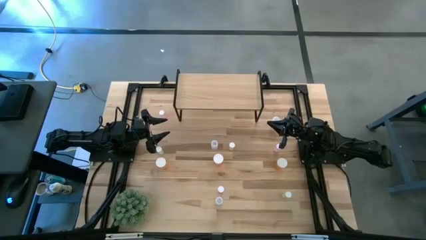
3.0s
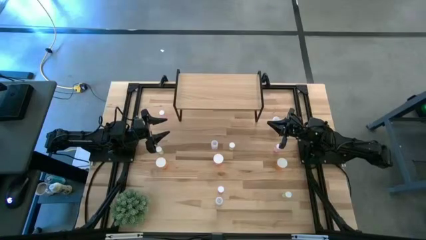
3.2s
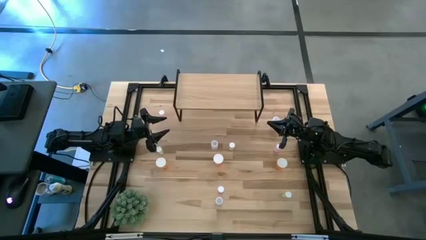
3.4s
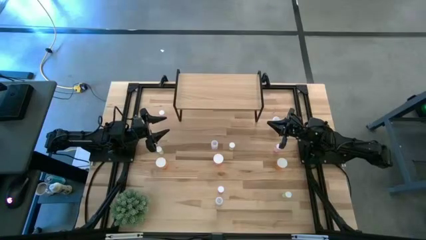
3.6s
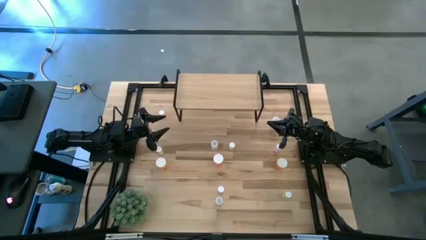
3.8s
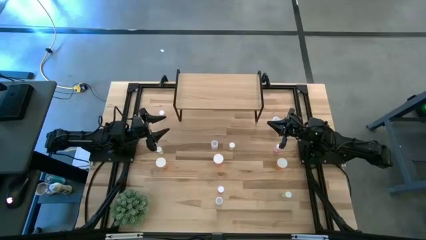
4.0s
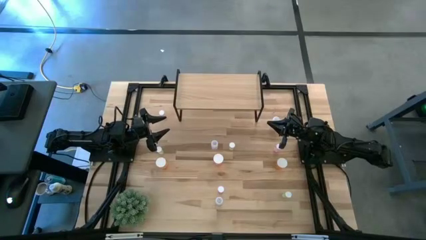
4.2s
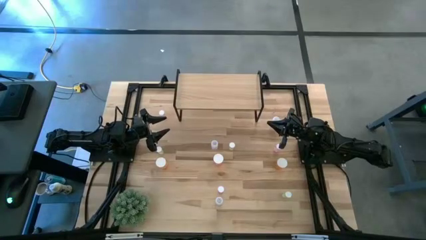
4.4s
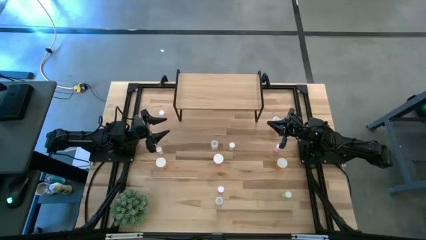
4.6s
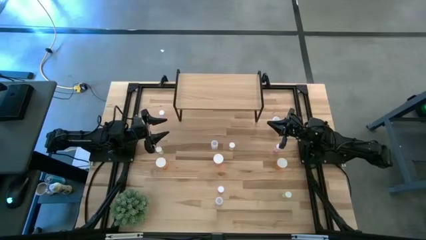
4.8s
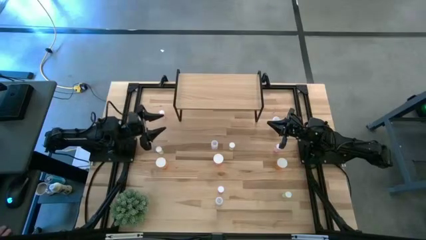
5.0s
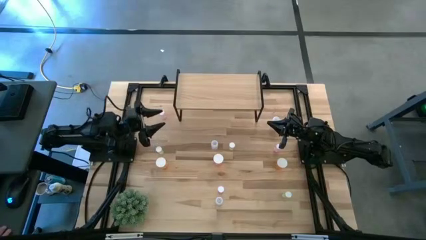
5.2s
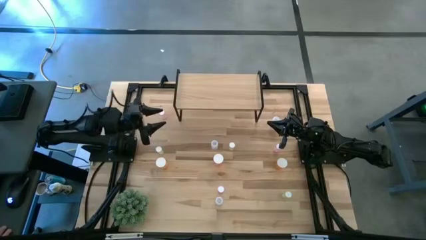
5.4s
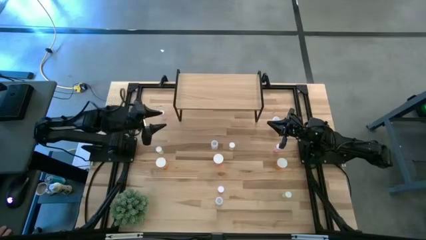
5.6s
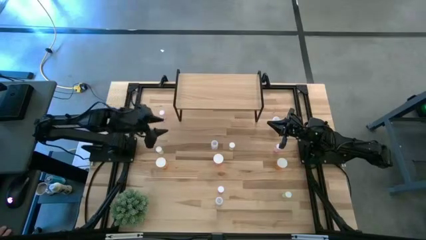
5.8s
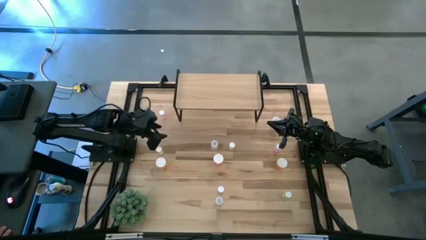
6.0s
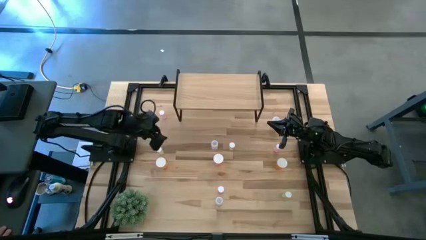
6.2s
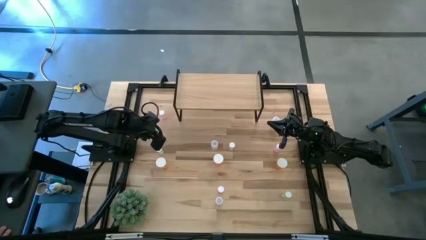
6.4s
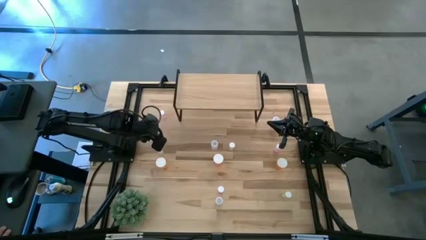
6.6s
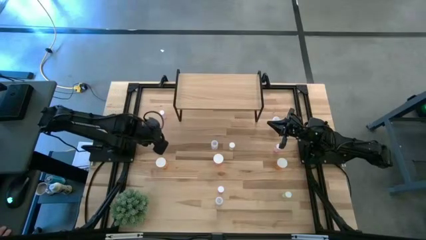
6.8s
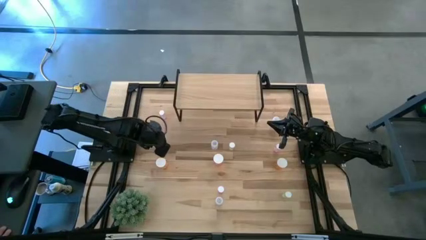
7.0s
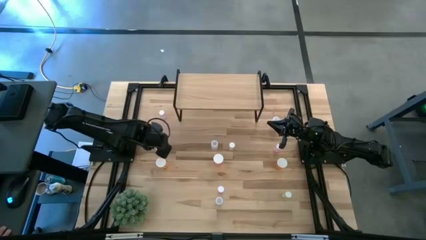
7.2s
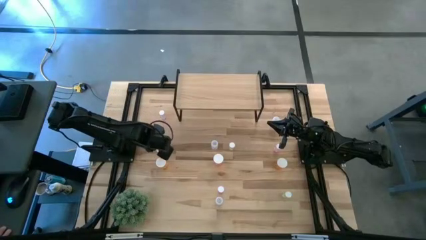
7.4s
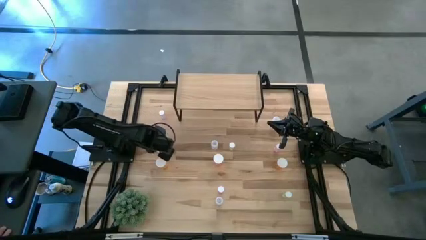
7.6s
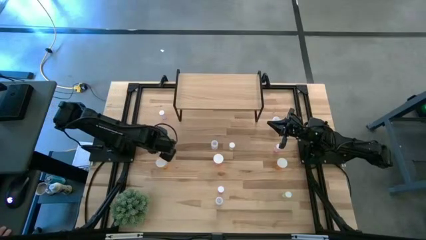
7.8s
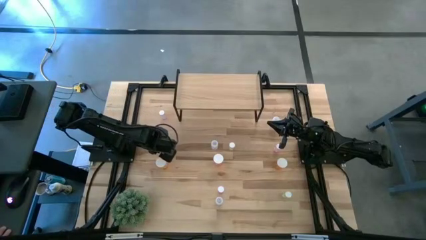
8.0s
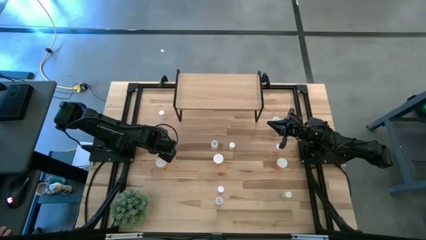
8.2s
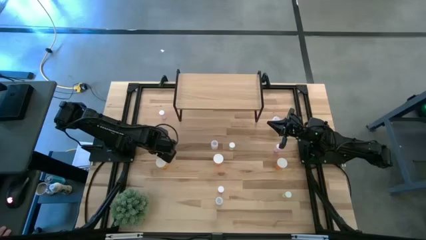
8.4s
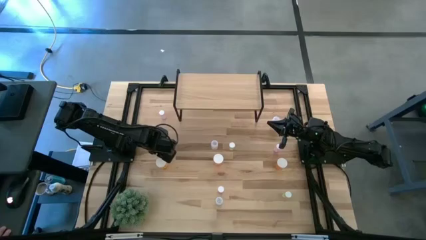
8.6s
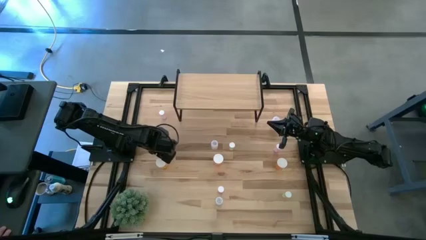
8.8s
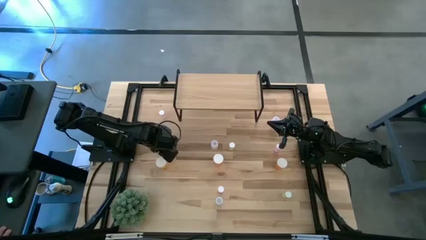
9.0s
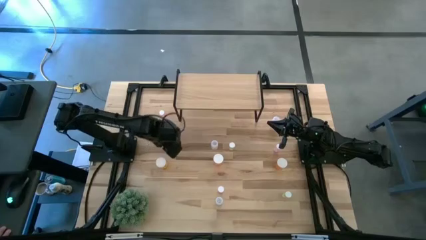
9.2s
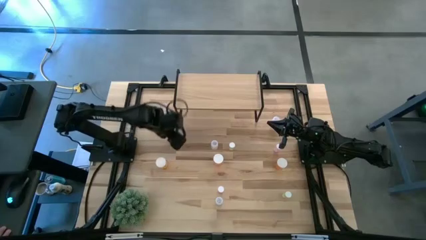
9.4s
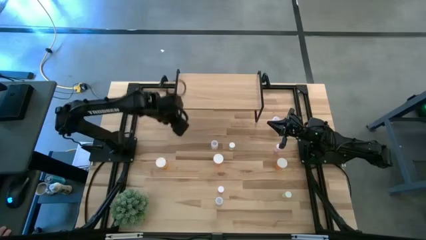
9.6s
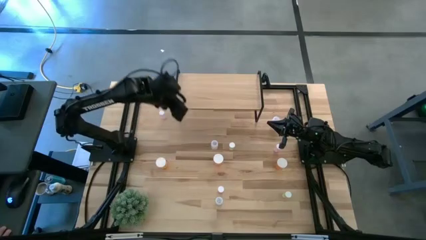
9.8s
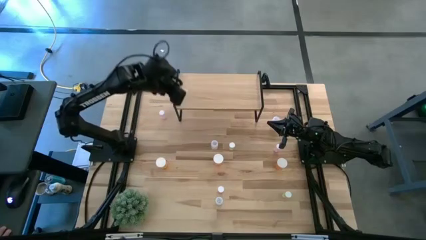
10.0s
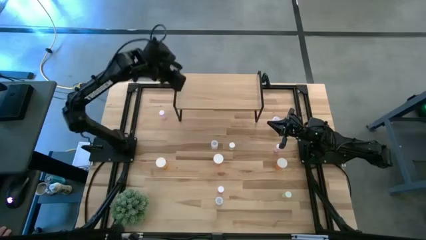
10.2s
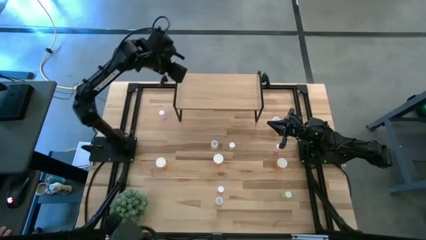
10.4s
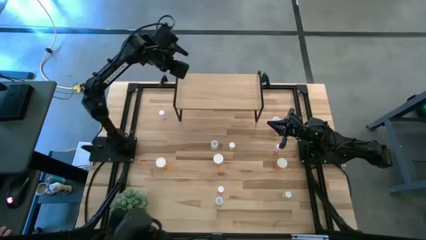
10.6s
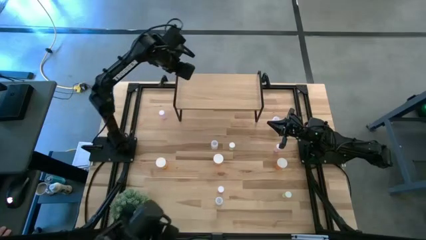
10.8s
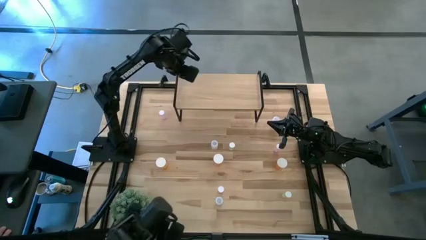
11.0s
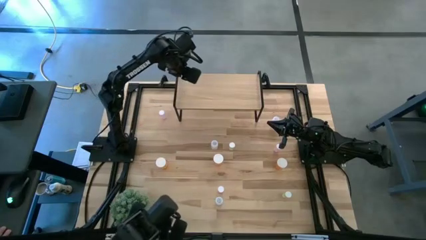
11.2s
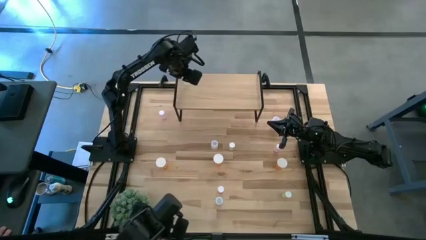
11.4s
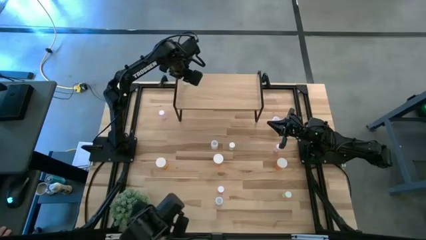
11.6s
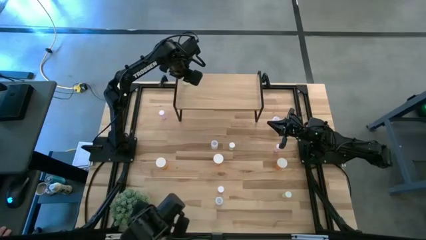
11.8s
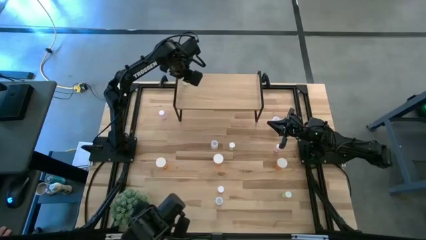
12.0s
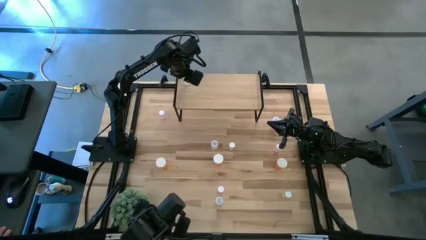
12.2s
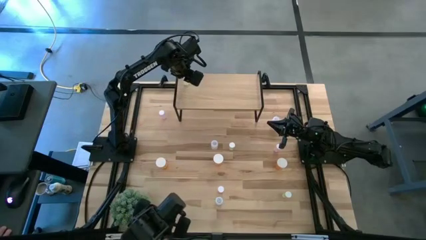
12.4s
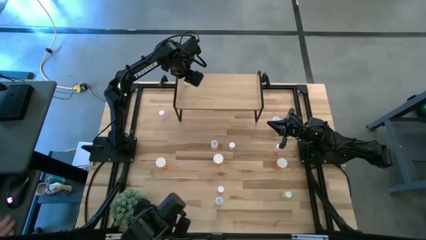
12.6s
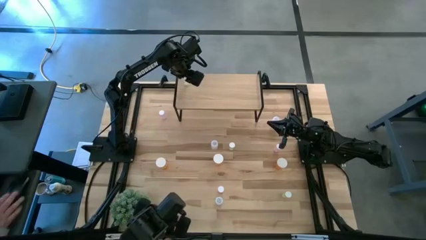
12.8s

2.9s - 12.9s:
Task: Pick and place medicine bottles onto shelf by color
Put the left yellow pill bottle on the shelf

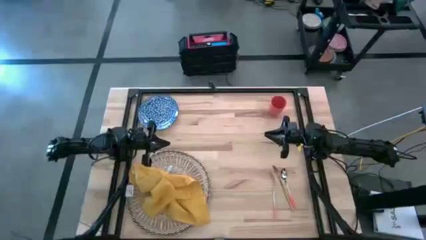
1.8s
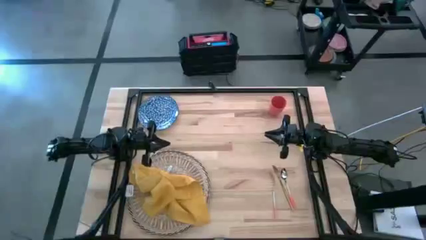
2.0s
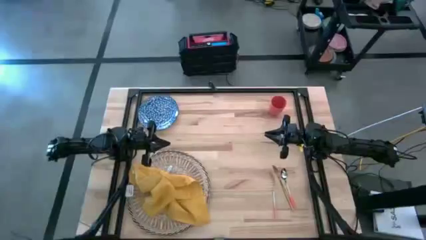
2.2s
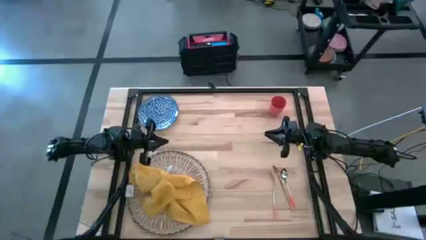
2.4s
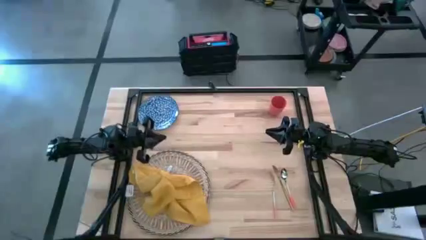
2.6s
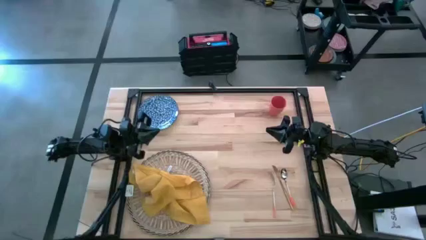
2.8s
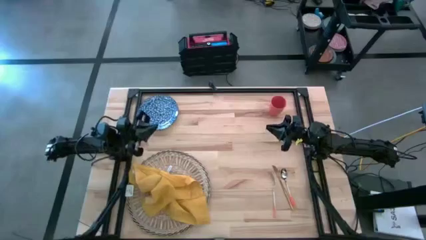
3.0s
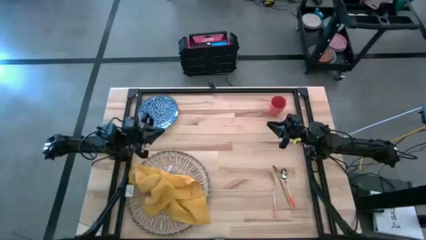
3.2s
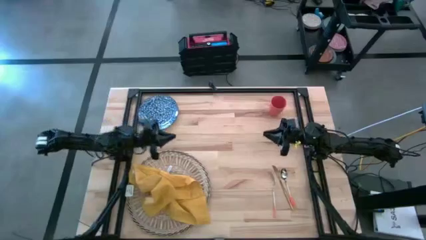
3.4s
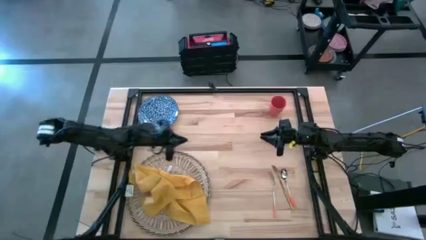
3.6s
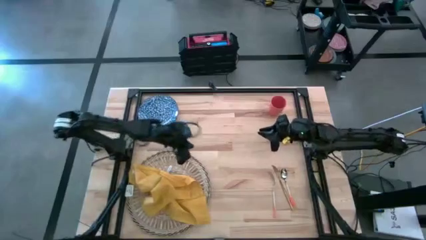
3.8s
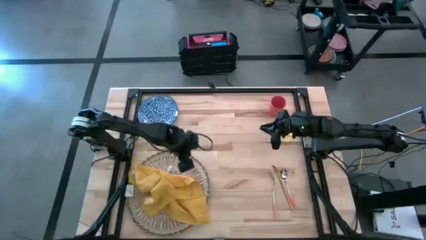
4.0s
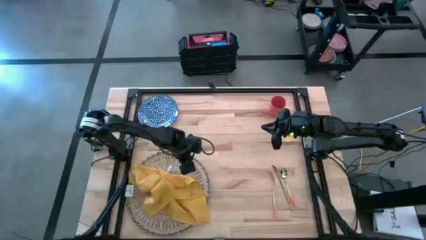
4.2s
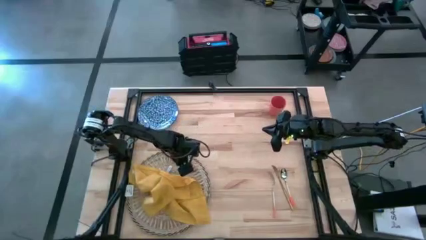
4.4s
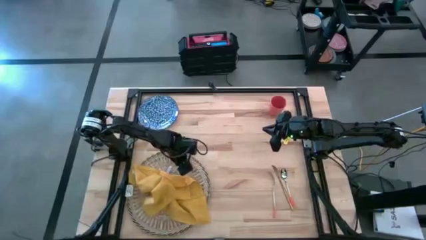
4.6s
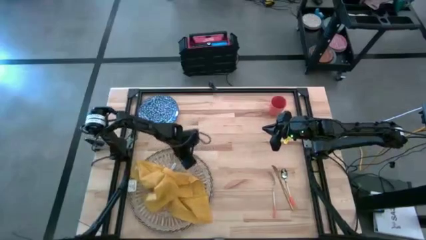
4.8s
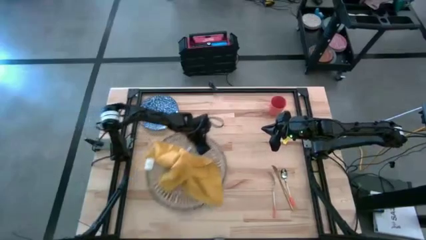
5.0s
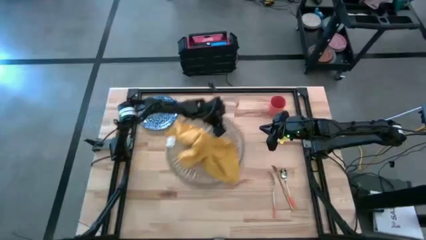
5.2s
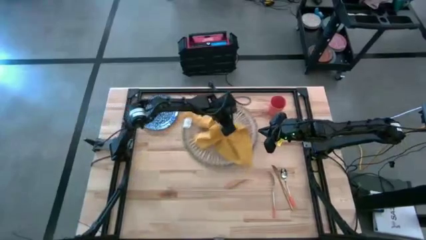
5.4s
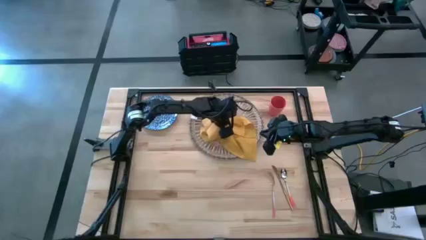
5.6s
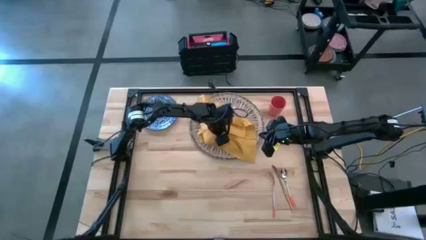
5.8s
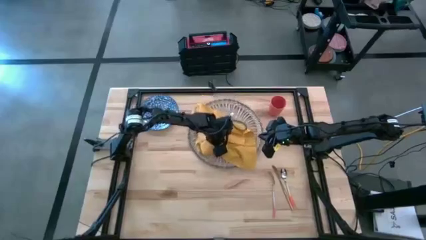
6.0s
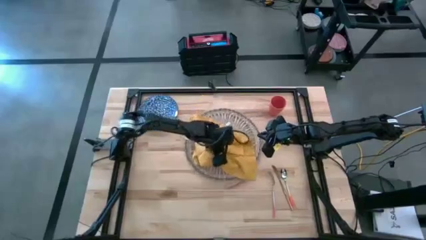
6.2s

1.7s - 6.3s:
Task: Set table place
Move the brown placemat to the center of the table

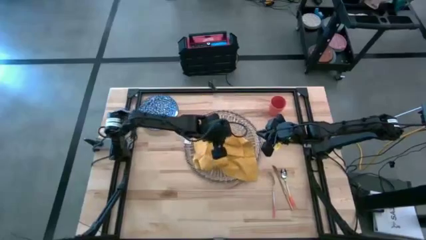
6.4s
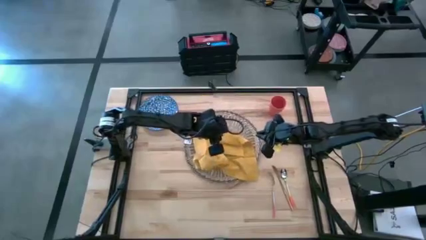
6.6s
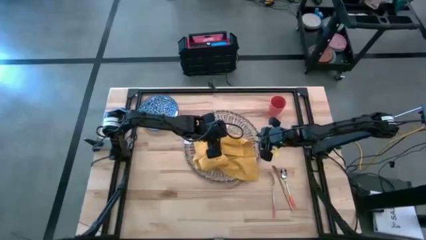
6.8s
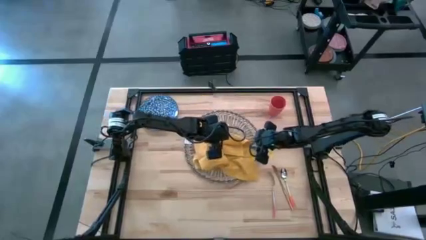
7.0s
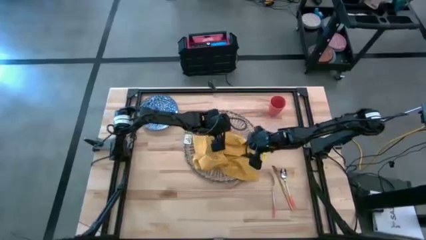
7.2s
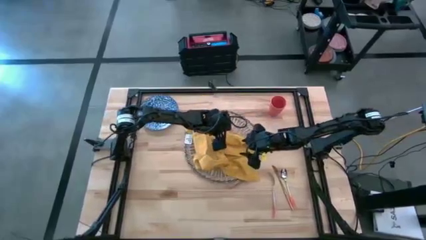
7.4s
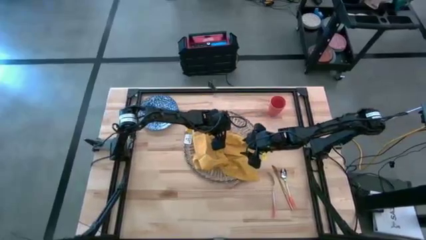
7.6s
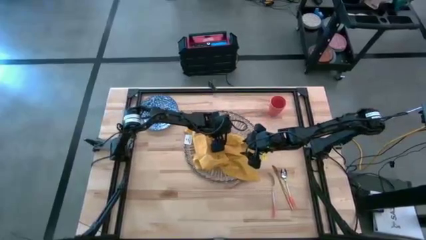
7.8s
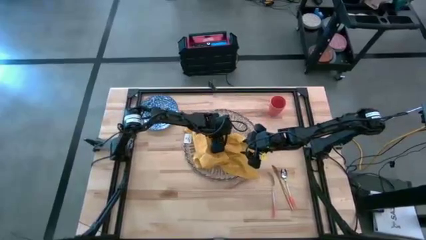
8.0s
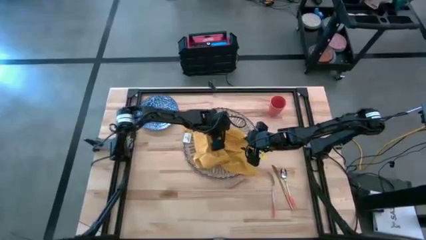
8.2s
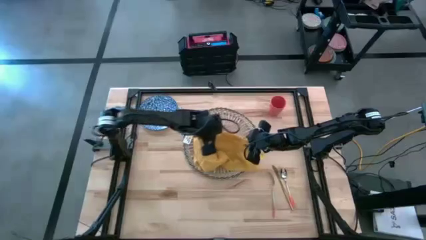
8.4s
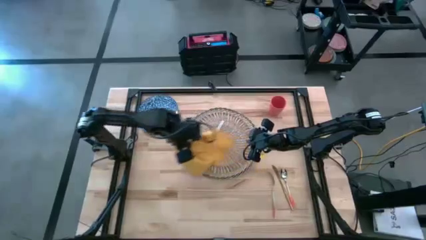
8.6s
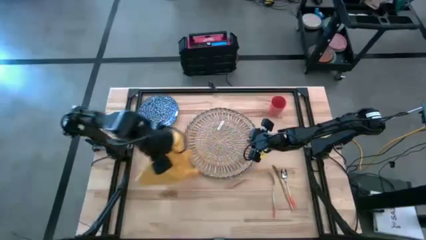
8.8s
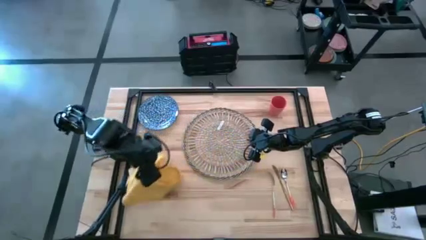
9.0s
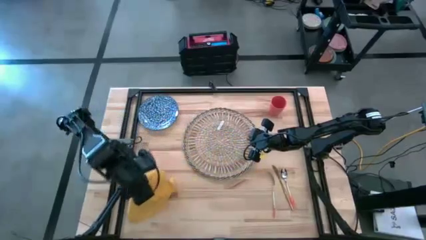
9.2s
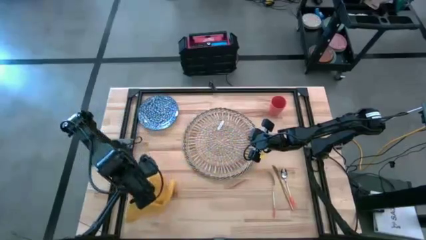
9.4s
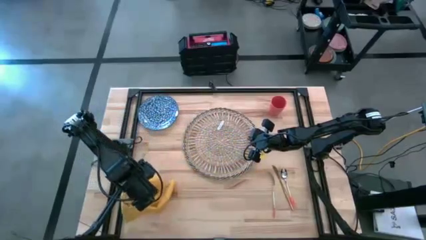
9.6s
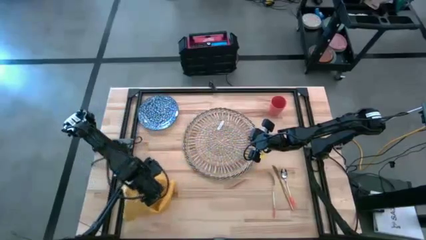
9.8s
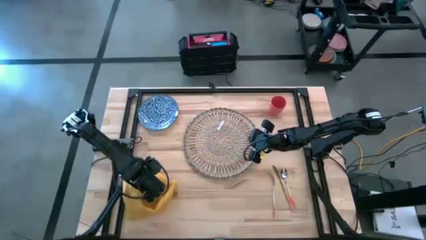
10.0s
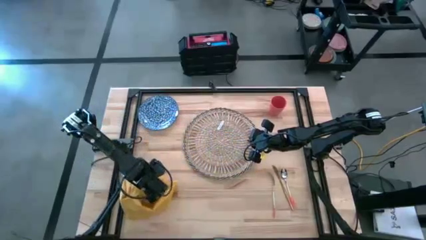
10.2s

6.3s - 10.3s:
Move the yellow table napkin to the bottom left of the table
